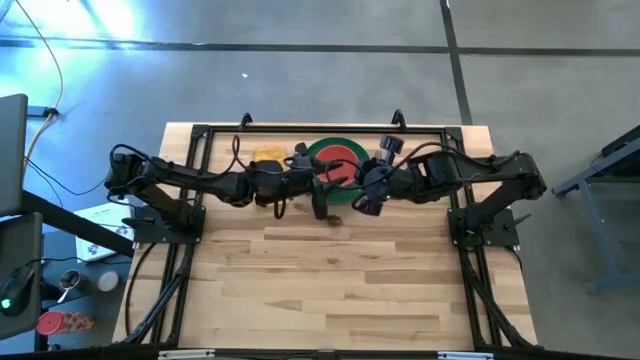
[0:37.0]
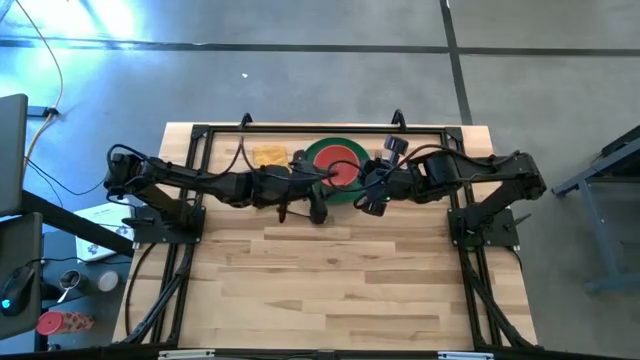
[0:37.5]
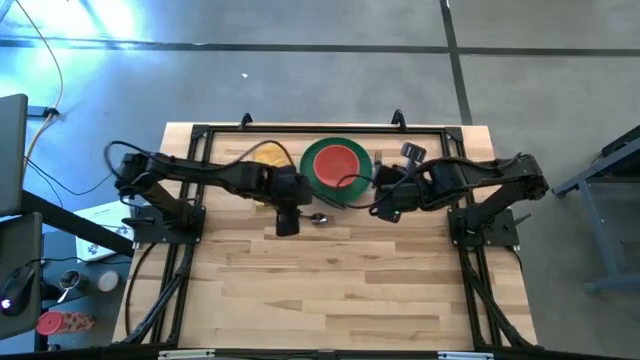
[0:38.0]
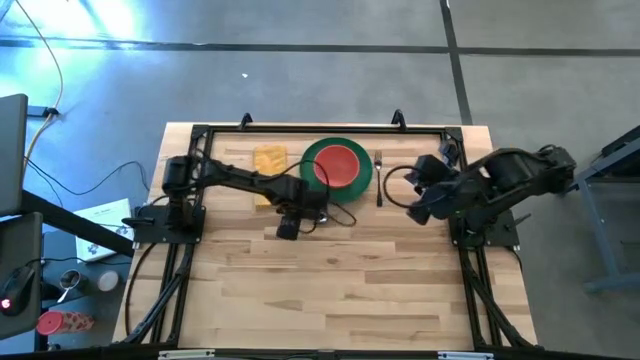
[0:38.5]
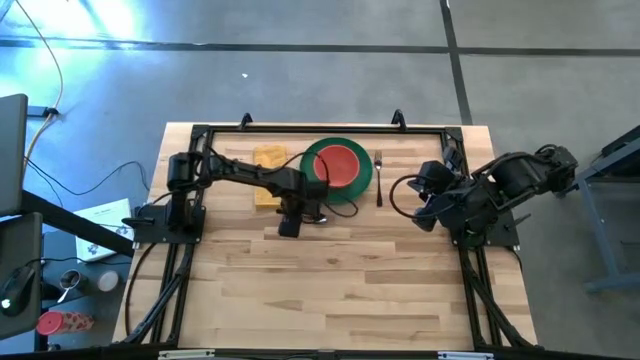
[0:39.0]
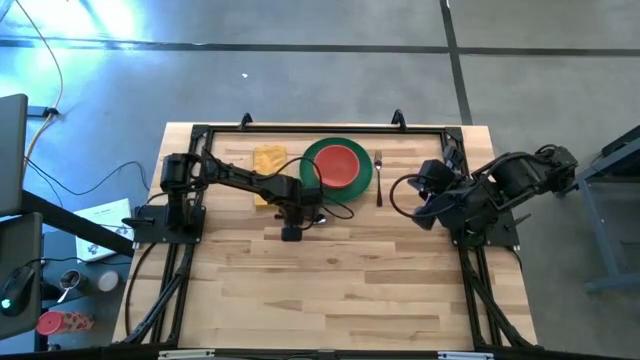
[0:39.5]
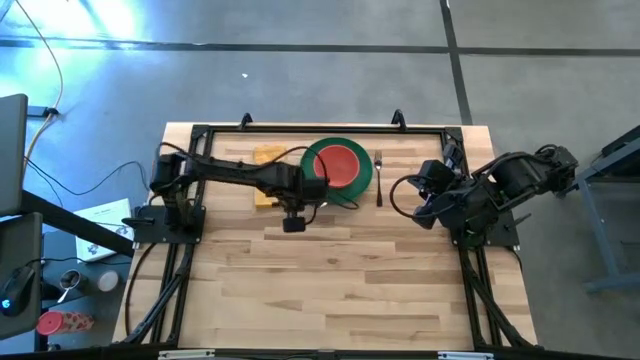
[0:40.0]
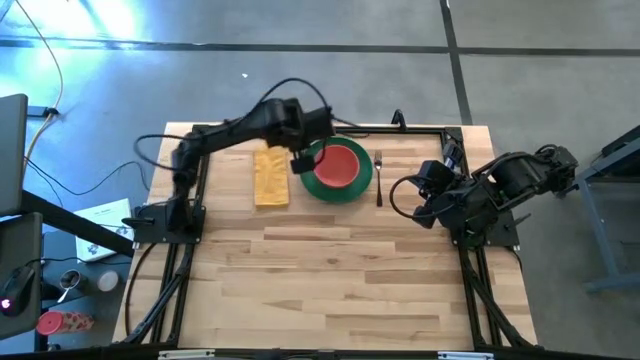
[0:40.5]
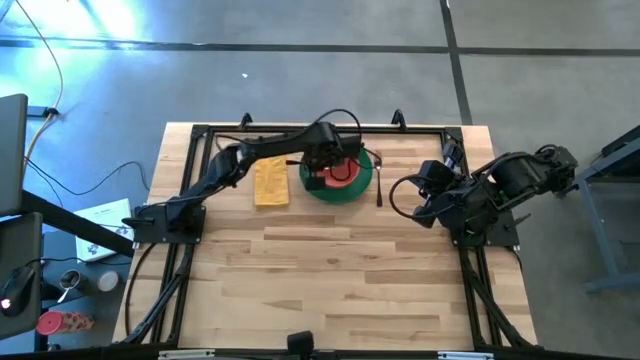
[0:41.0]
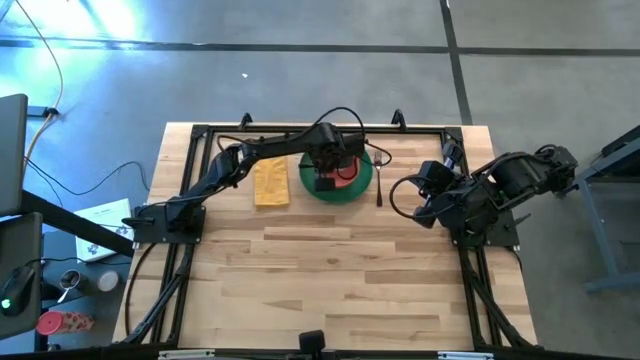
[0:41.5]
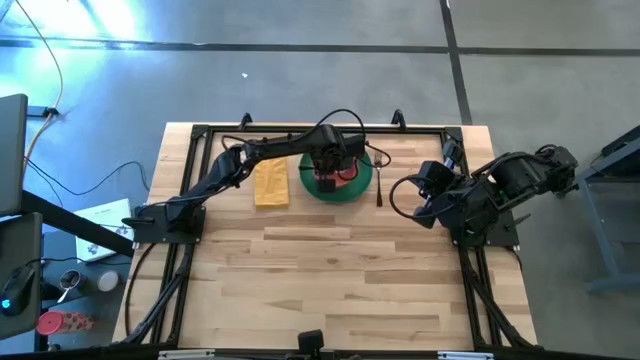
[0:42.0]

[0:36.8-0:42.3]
Task: Set table place
Put the black spoon into the orange bowl

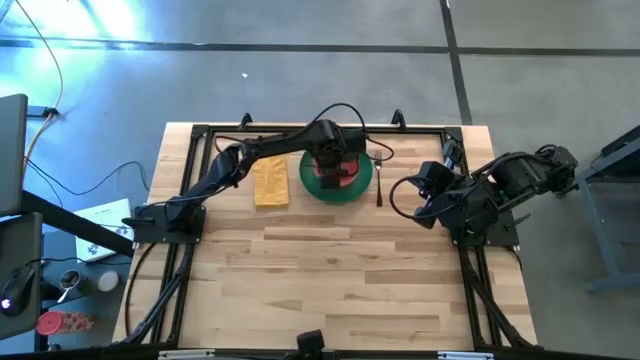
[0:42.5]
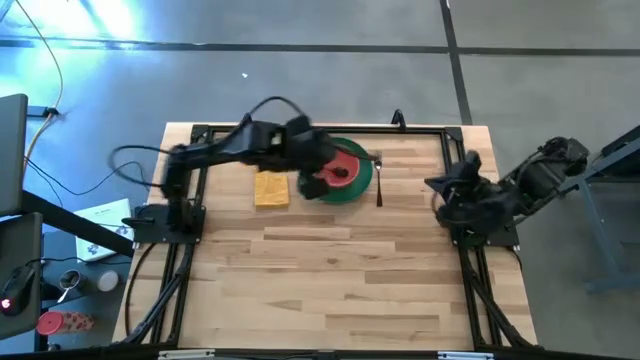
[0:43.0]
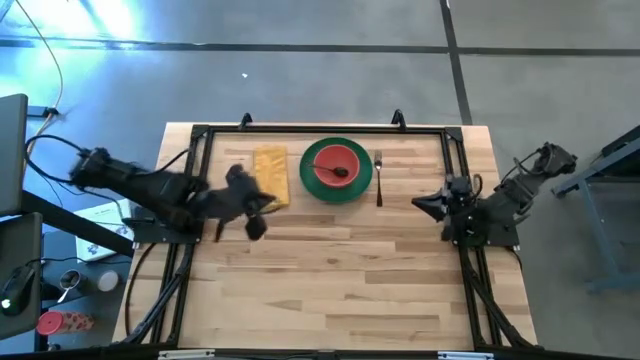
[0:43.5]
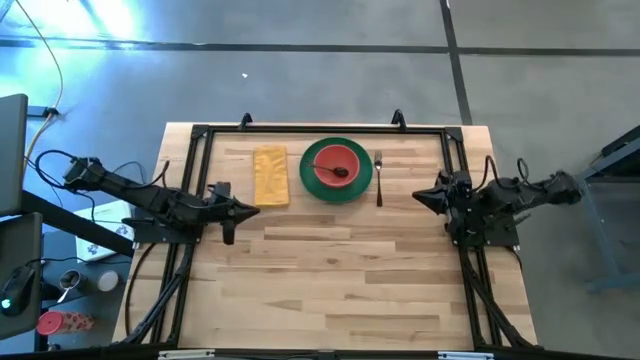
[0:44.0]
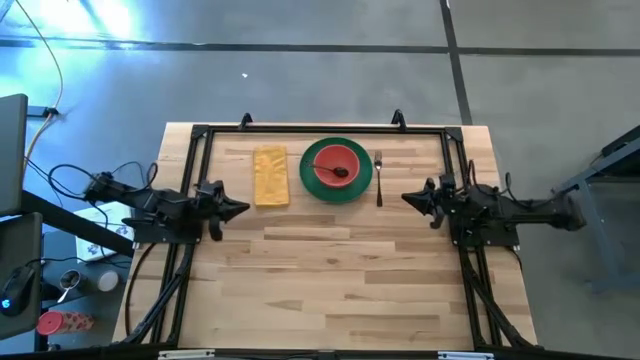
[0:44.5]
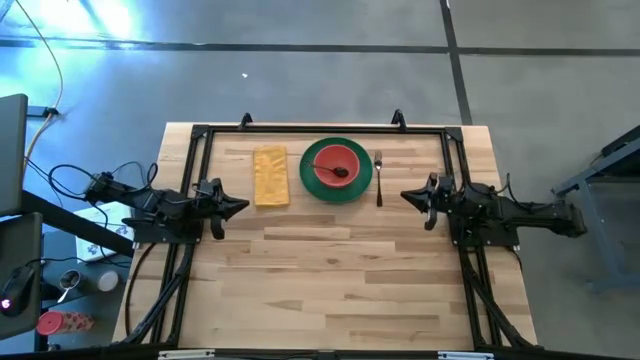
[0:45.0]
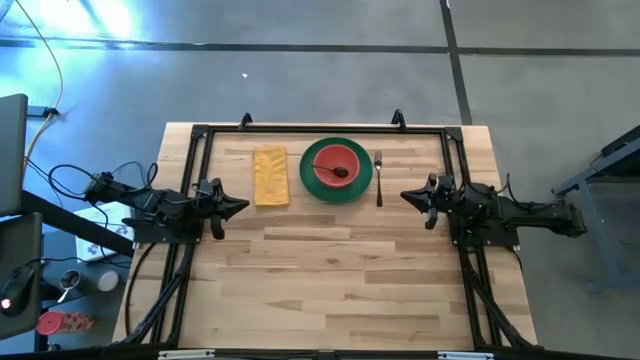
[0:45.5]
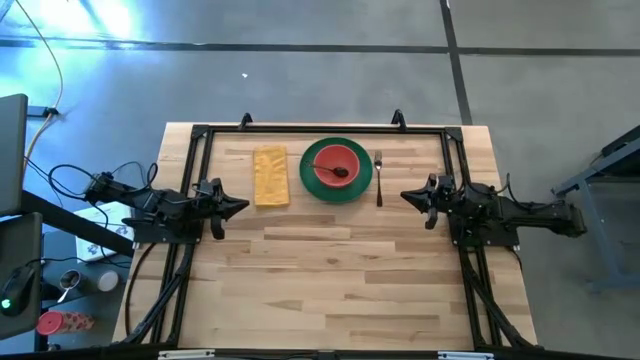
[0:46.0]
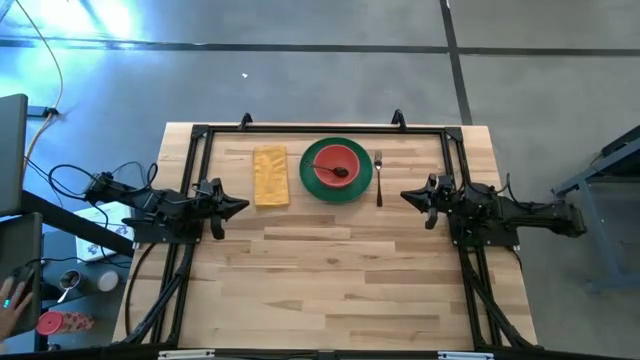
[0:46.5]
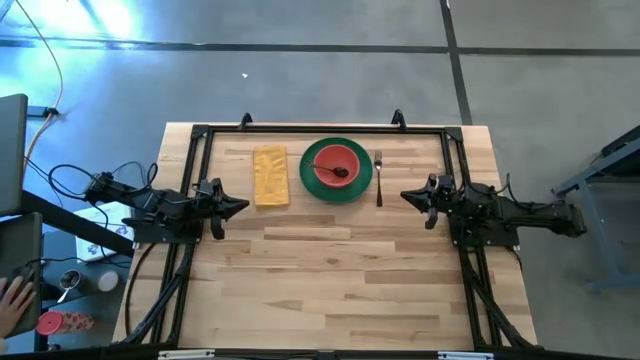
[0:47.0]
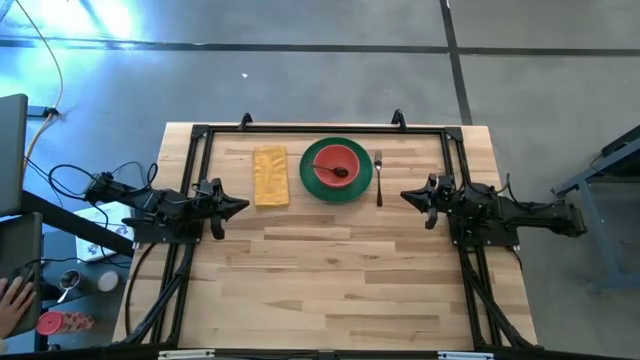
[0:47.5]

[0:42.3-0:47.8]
Return to Home Position

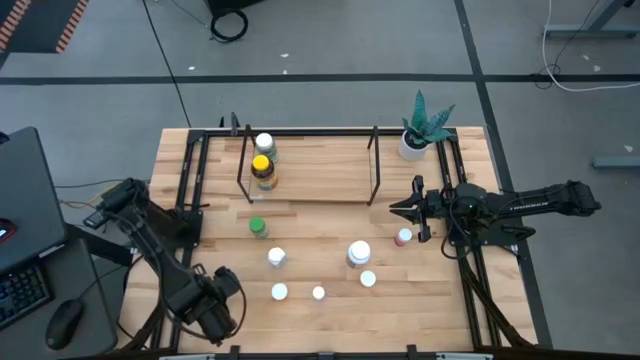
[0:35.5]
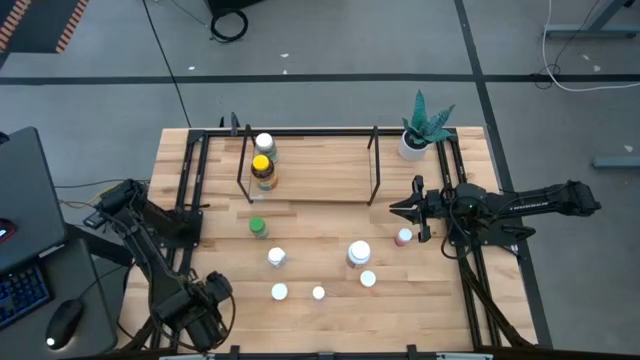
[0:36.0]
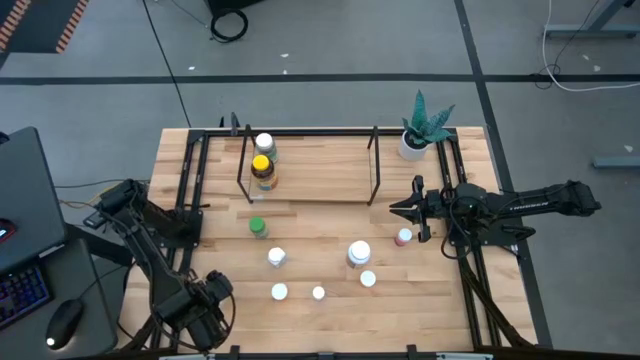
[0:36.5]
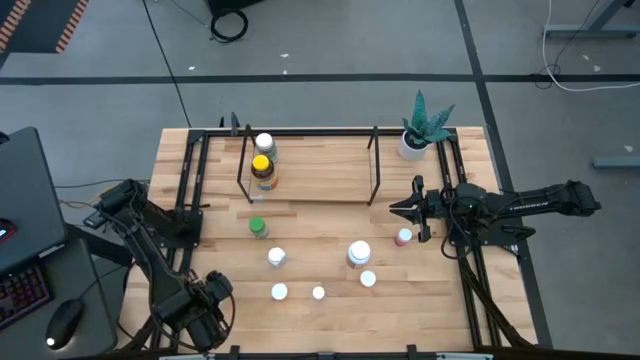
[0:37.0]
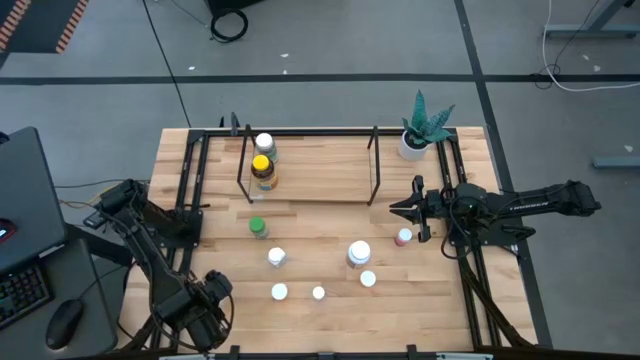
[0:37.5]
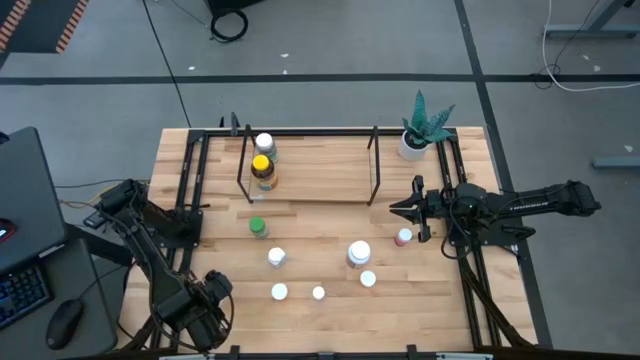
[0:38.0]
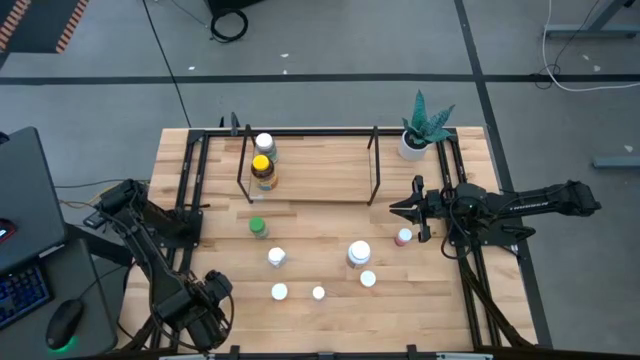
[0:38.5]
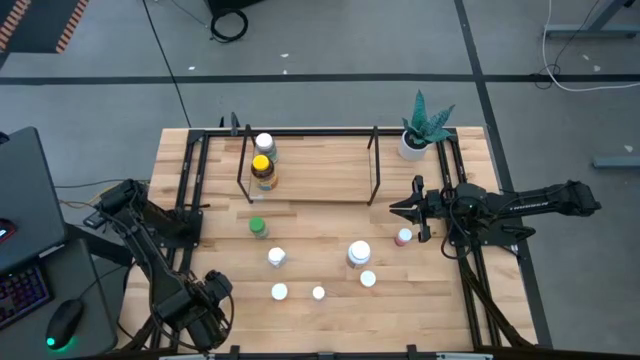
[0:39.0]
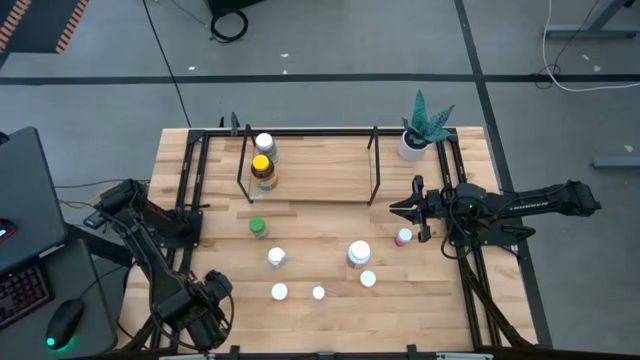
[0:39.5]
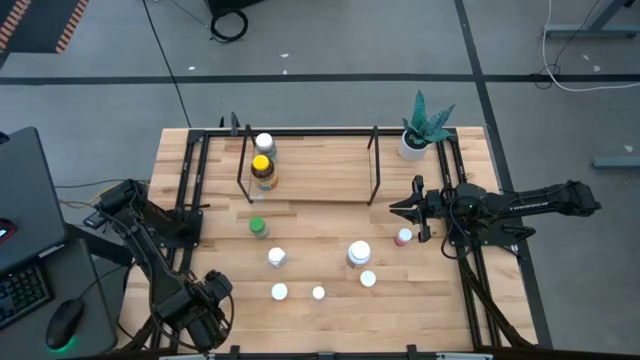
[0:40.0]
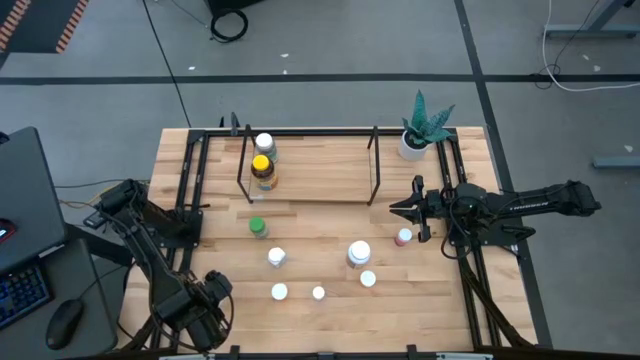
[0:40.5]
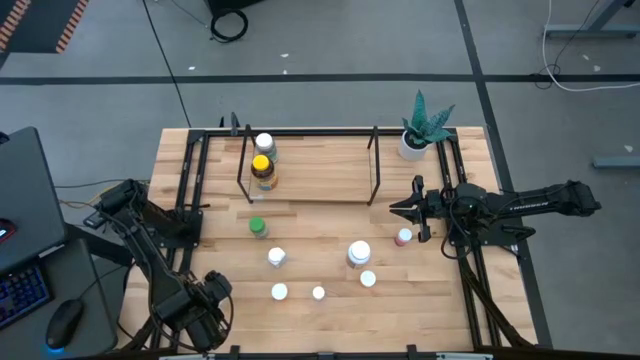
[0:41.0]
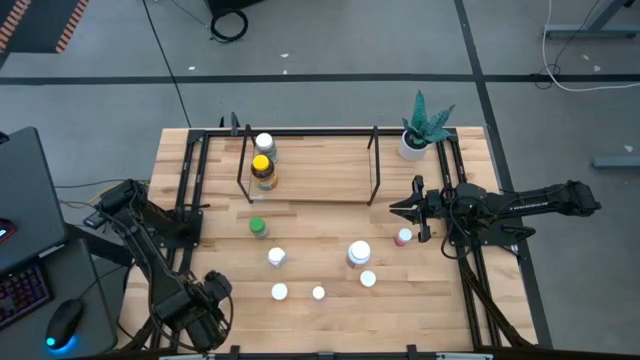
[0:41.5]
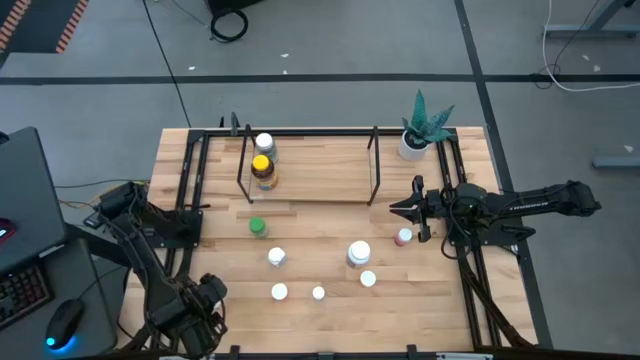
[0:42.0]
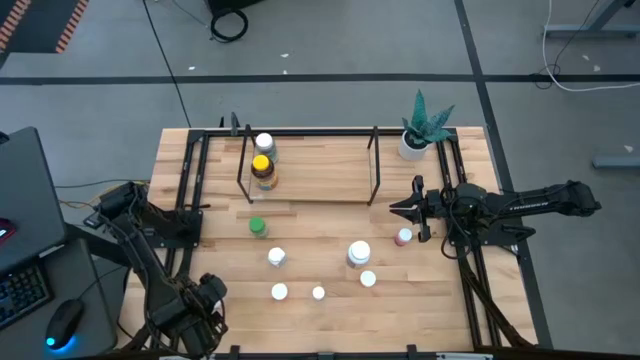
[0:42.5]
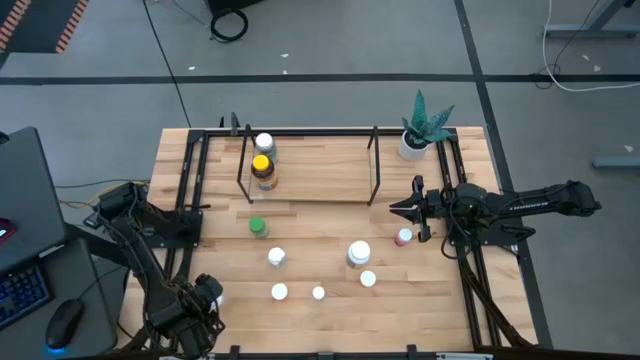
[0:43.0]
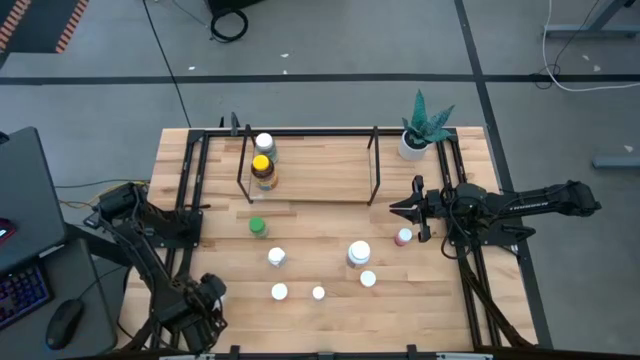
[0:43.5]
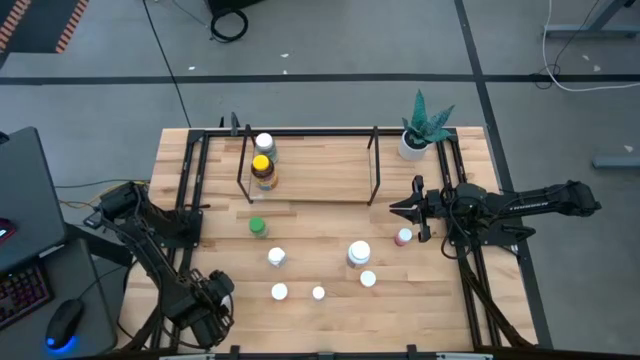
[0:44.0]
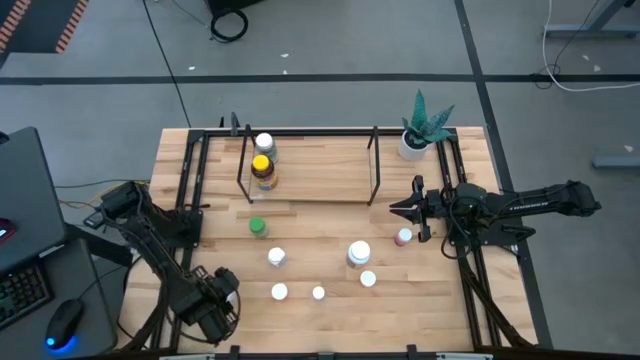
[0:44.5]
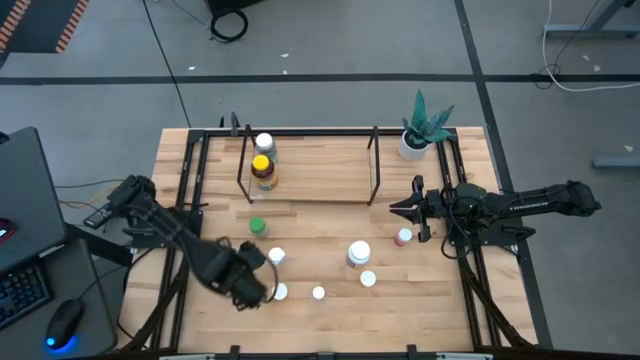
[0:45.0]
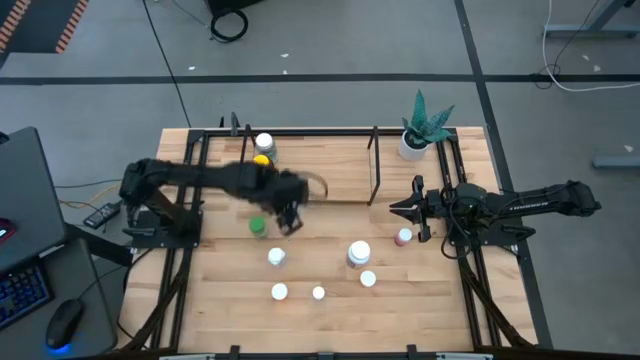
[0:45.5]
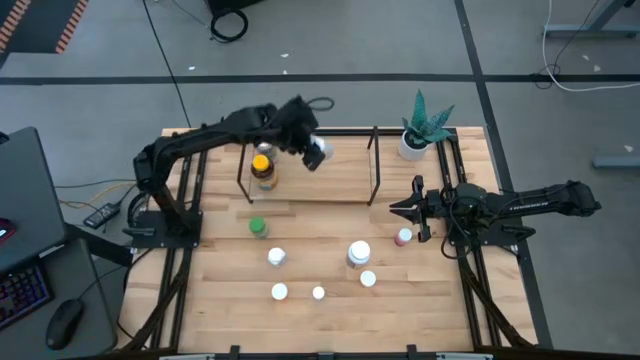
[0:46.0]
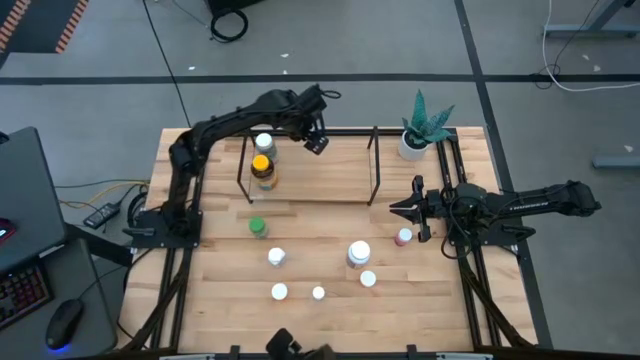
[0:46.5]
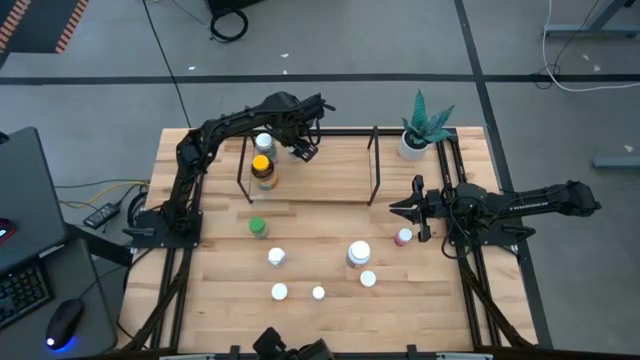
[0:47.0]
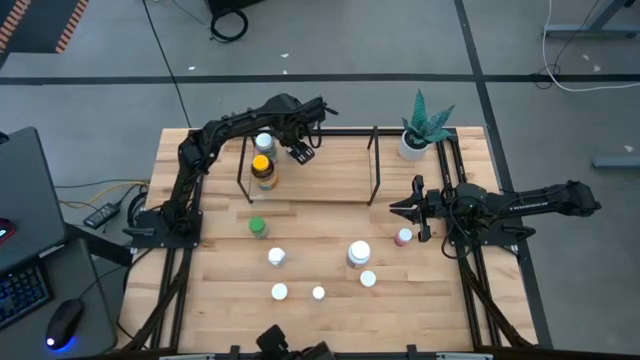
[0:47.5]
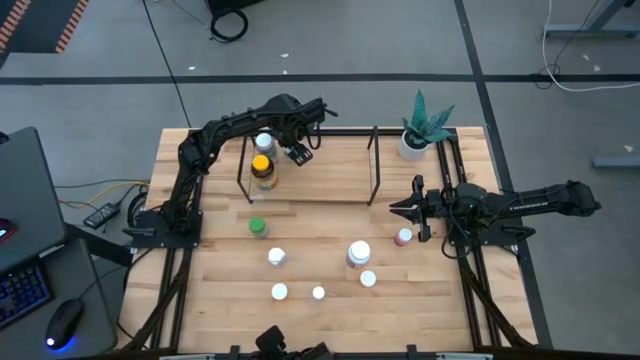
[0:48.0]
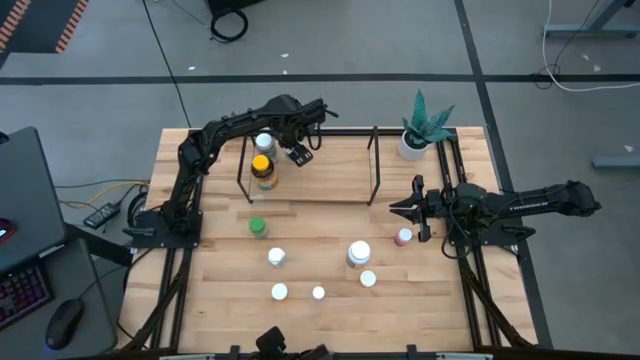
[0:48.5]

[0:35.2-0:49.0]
Task: Pick and place medicine bottles onto shelf by color
Put the bottom white green pill bottle on the shelf
